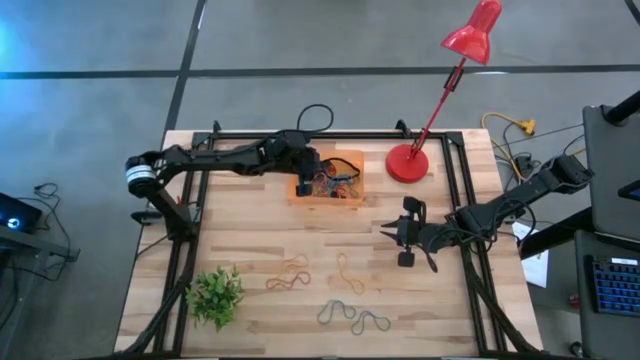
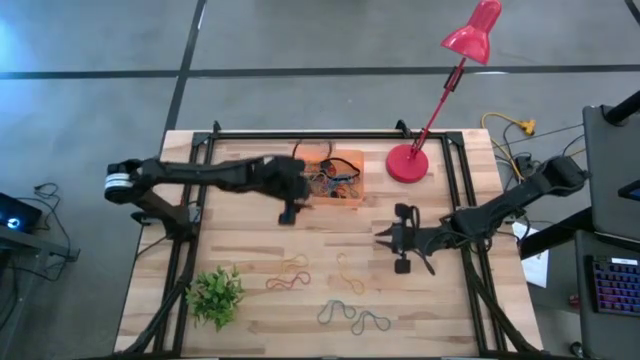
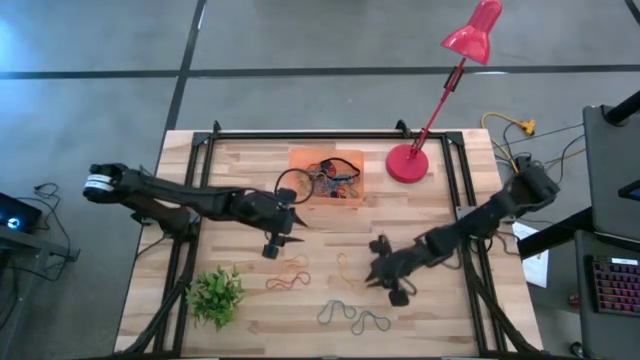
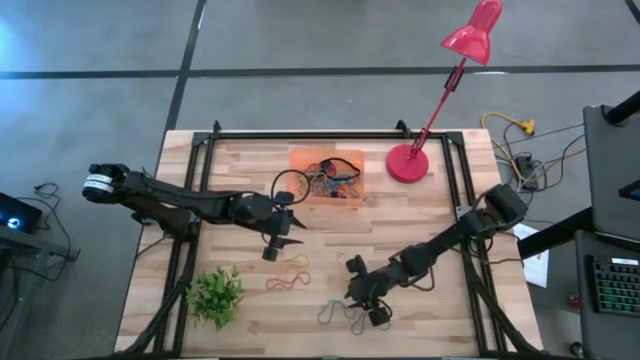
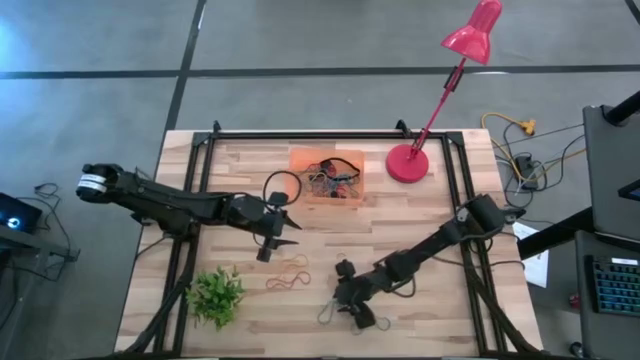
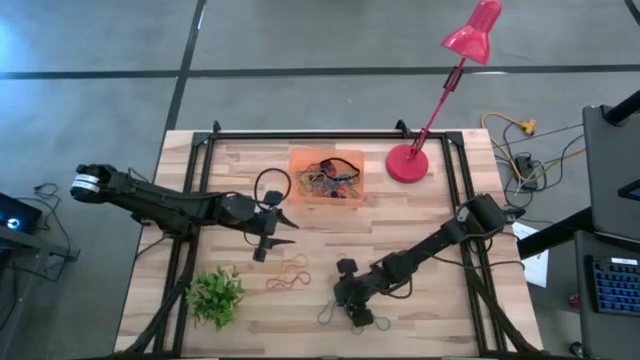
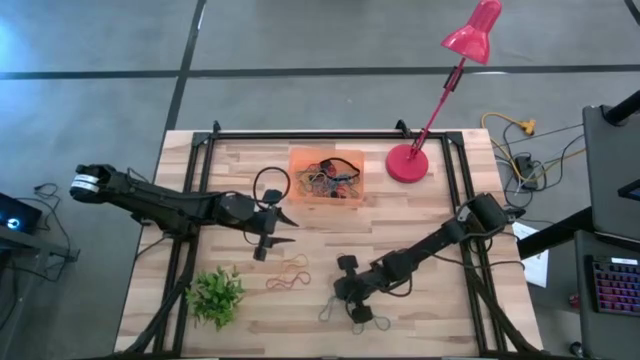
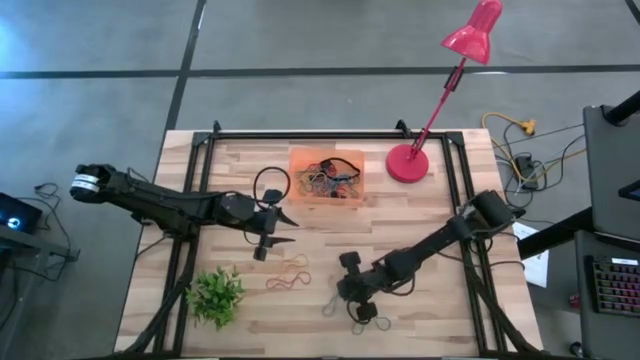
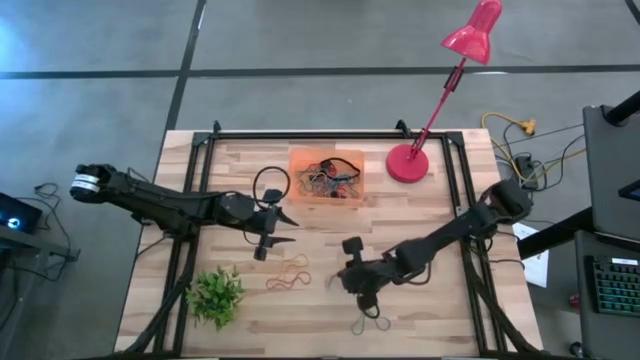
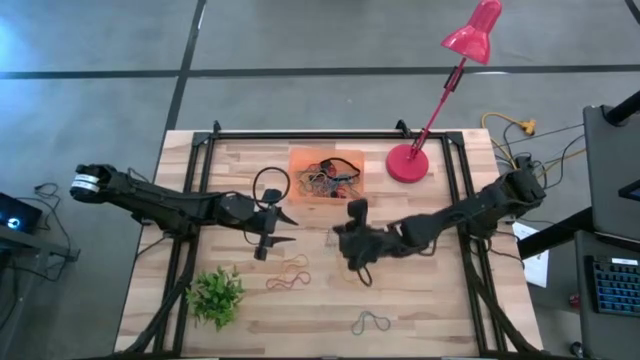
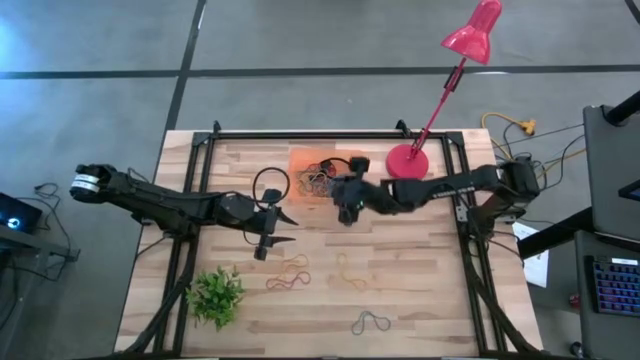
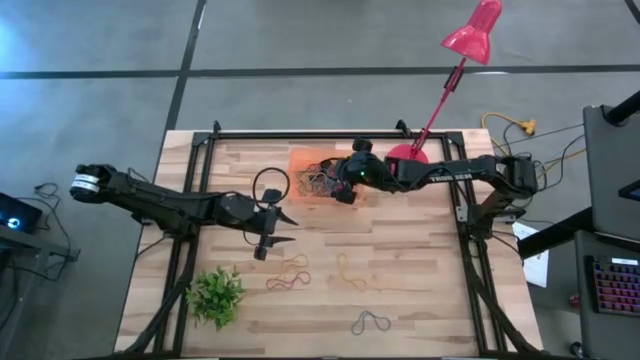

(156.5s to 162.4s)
Task: Pick and place rubber bands into bin
Put the blue rubber band into the orange bin

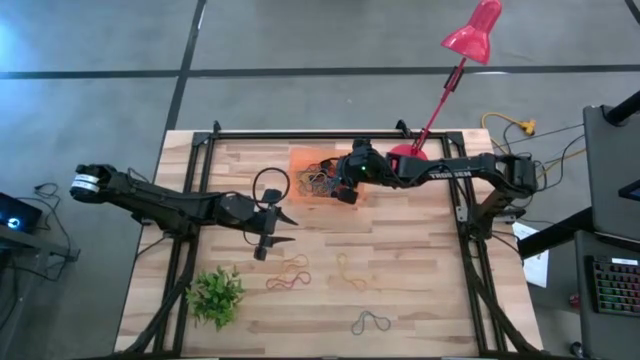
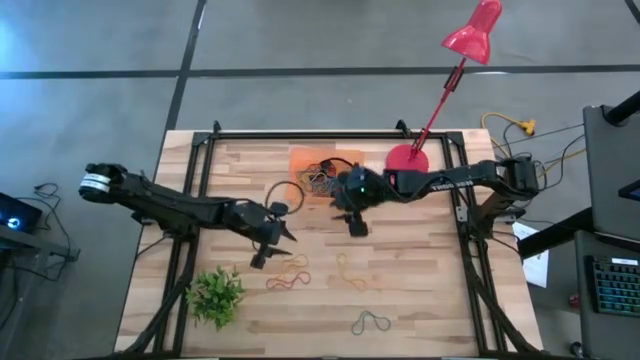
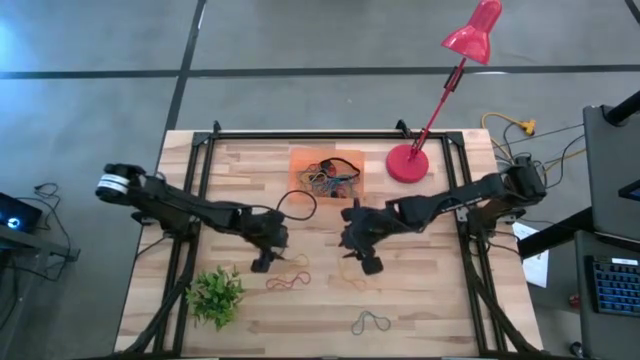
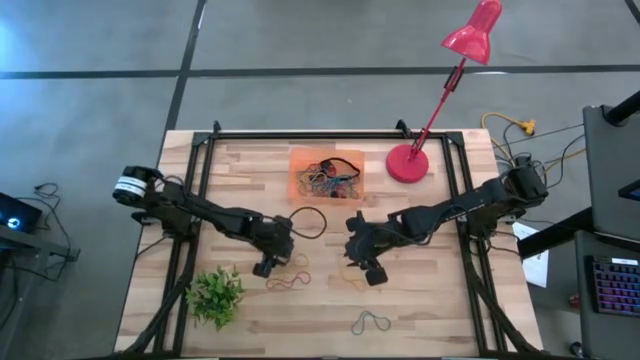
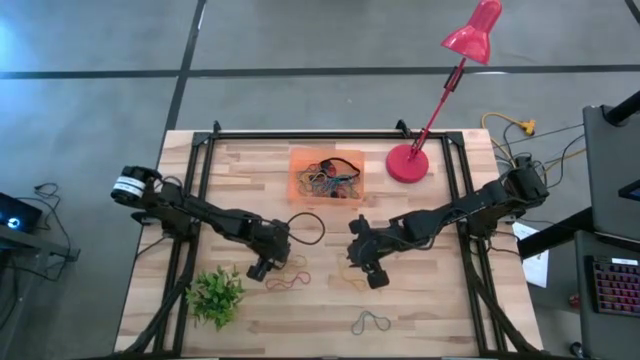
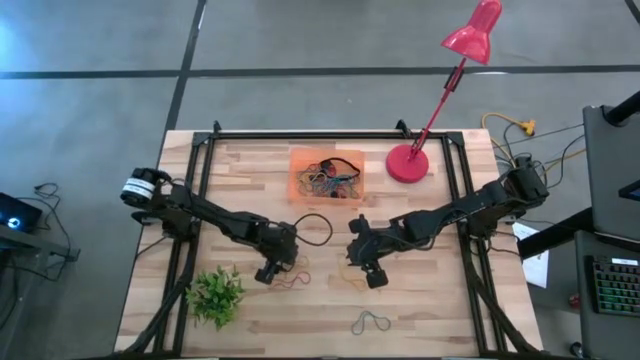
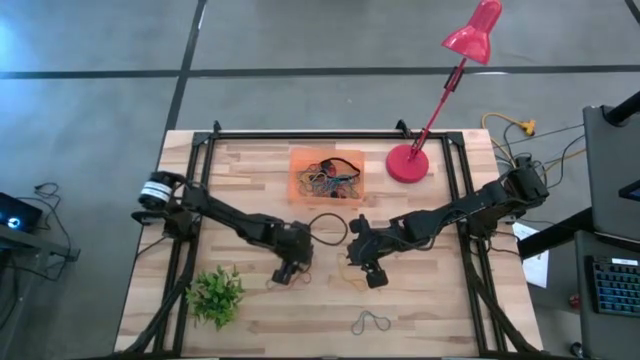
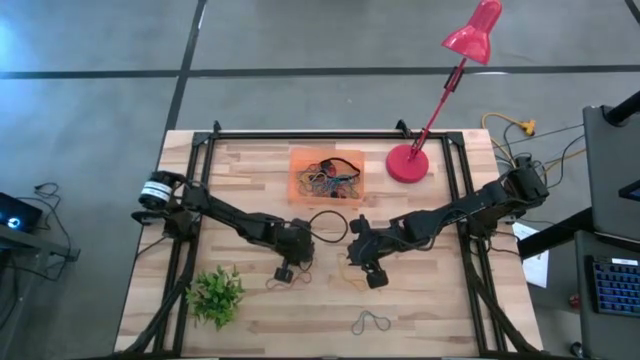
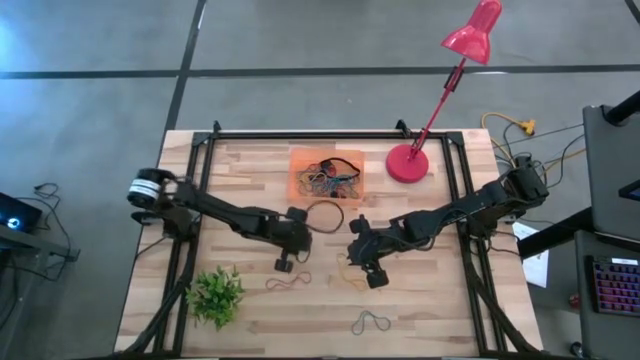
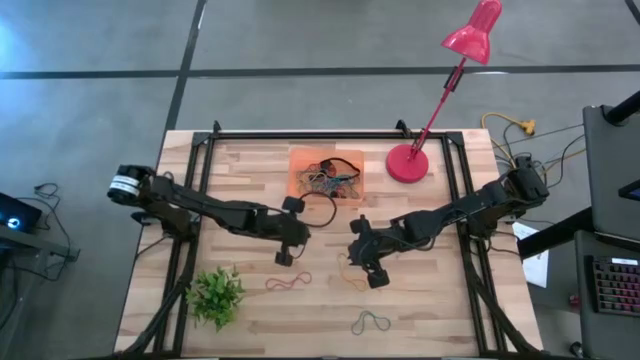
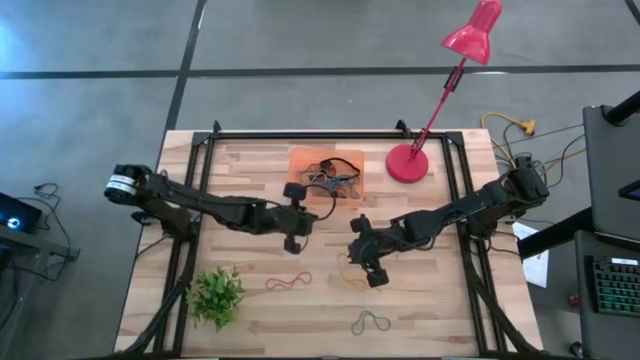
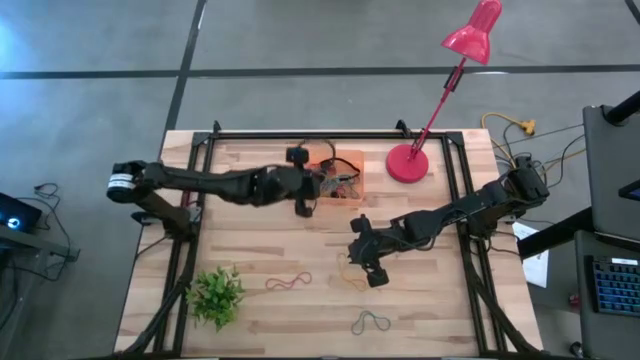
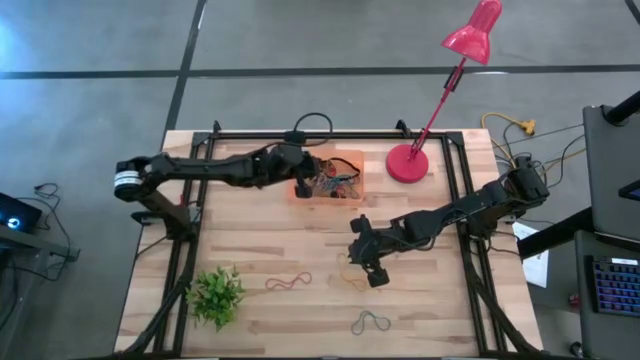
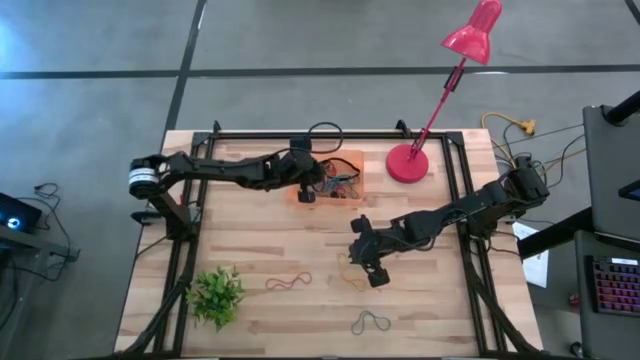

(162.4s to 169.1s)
Put the yellow rubber band into the orange bin

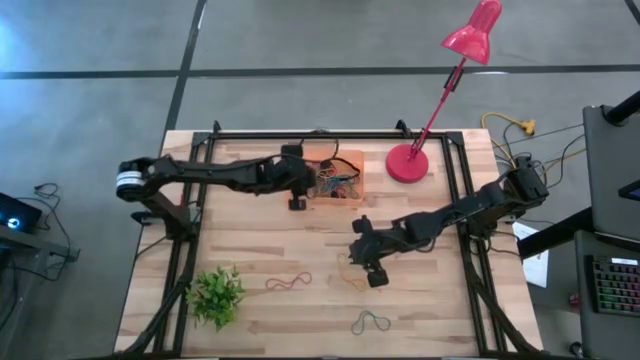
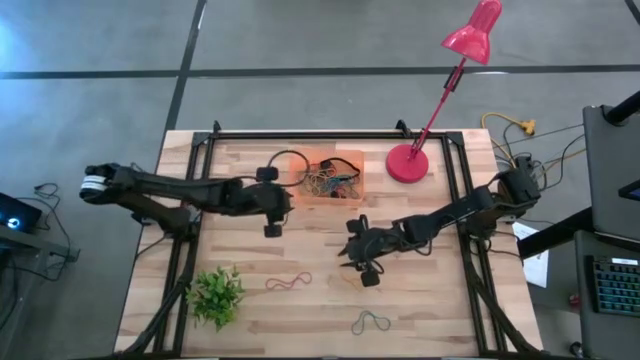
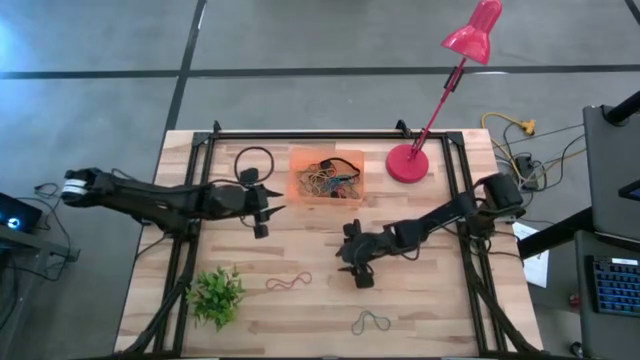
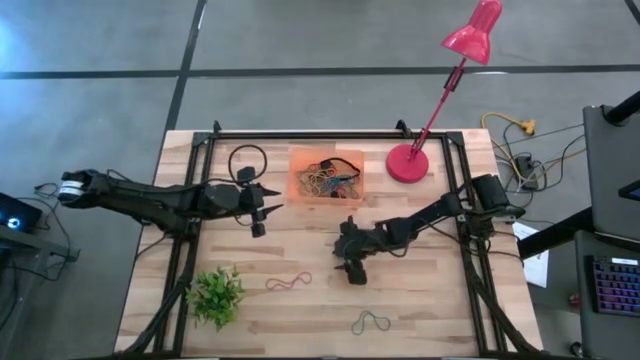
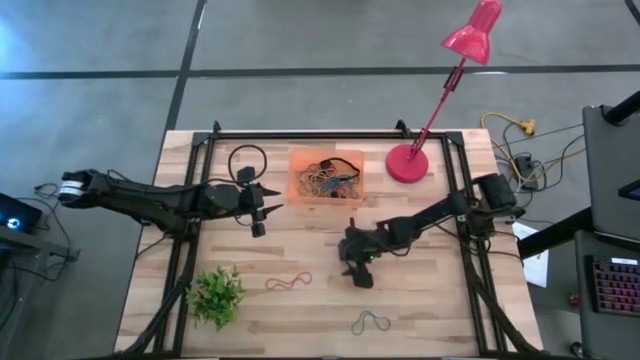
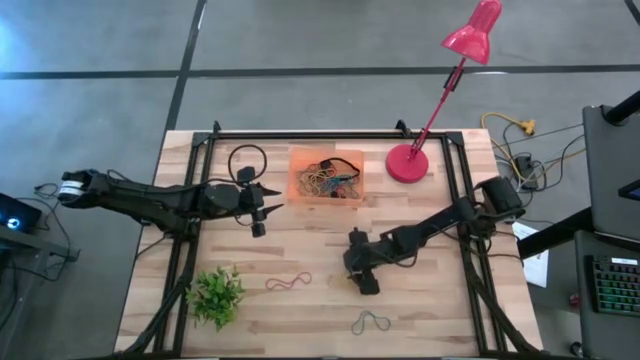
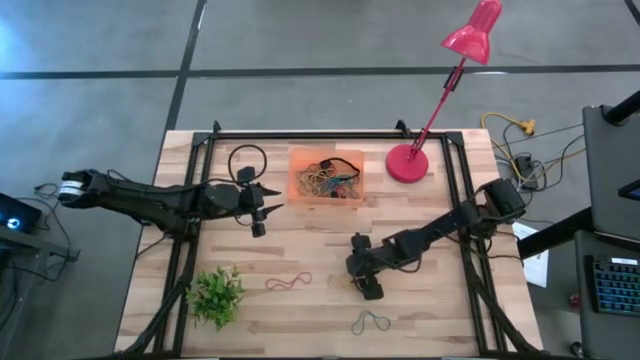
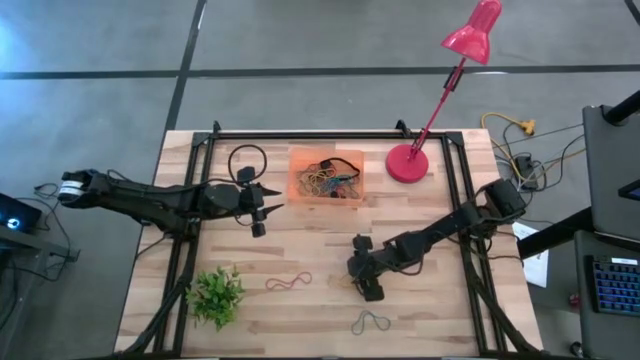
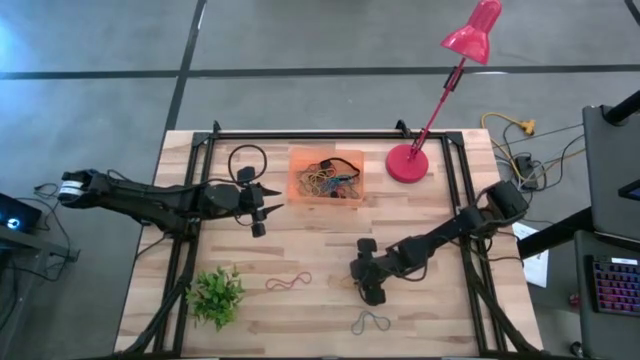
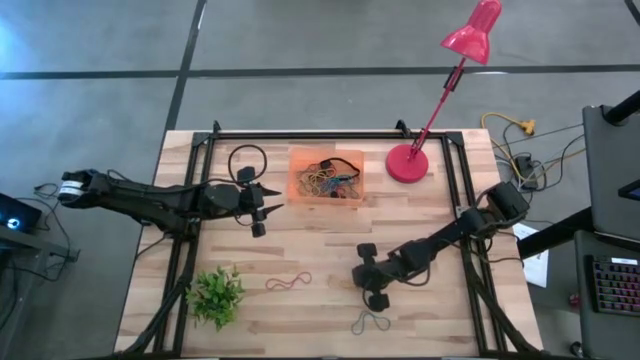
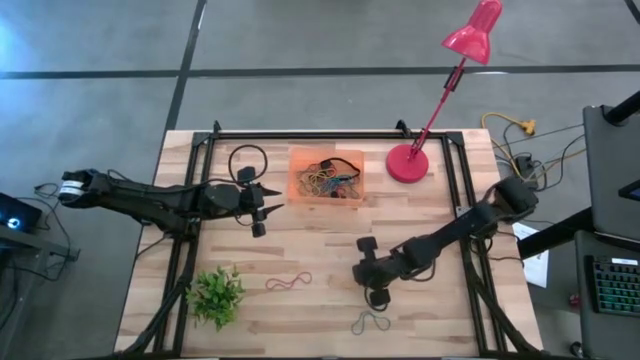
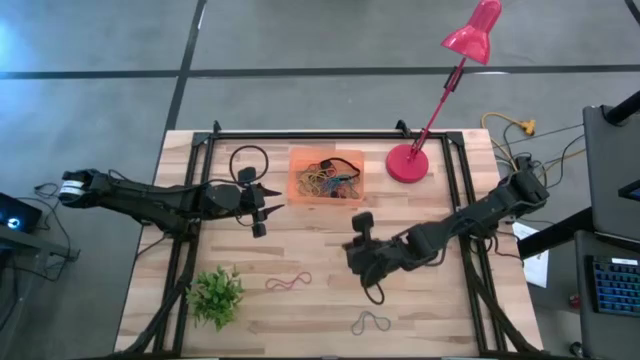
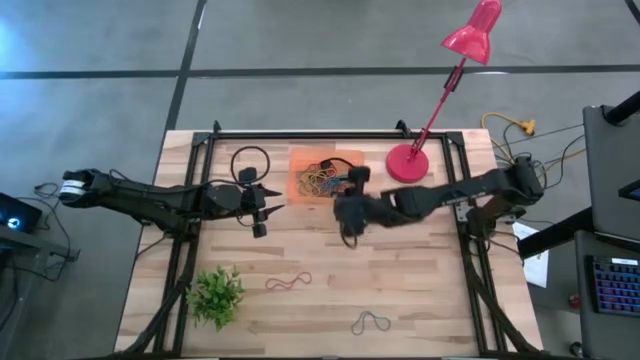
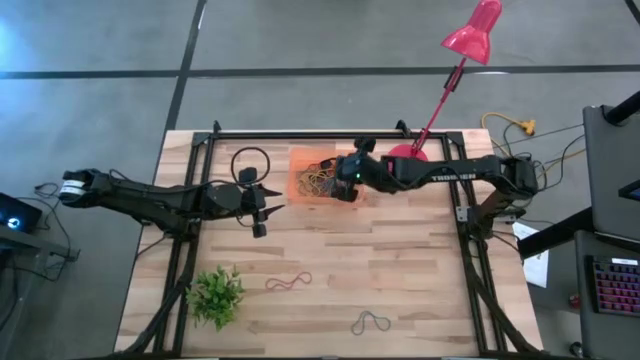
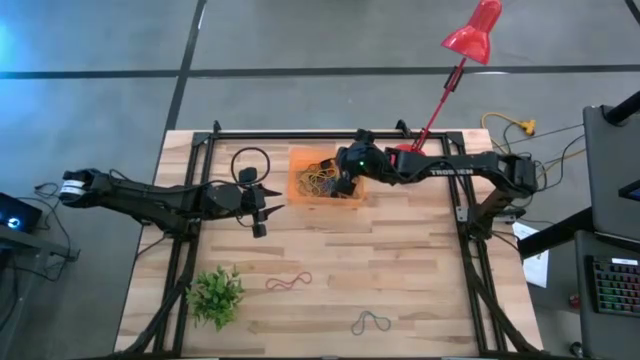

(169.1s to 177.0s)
Put the yellow rubber band into the orange bin
